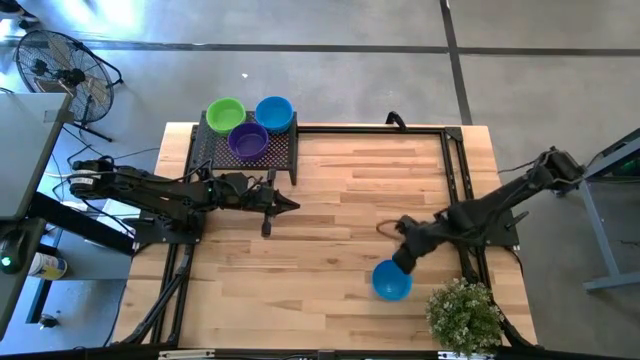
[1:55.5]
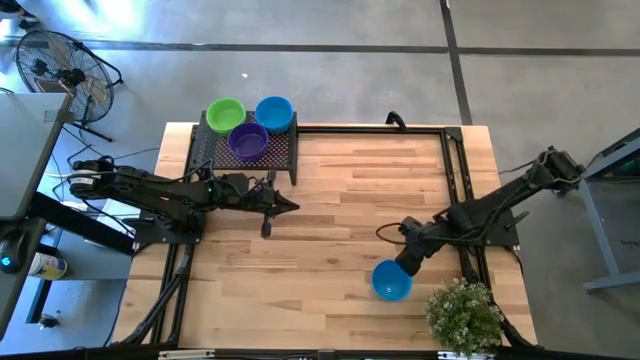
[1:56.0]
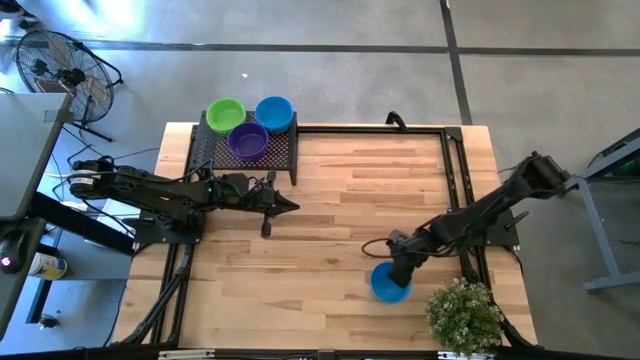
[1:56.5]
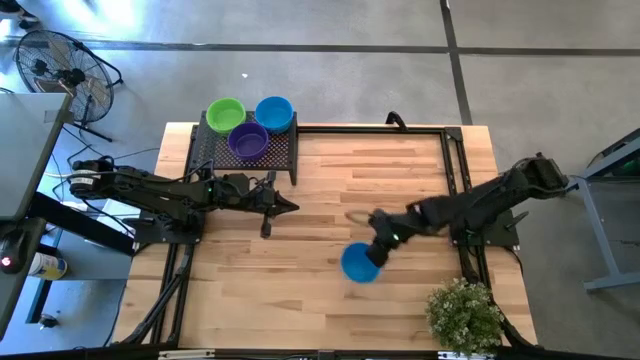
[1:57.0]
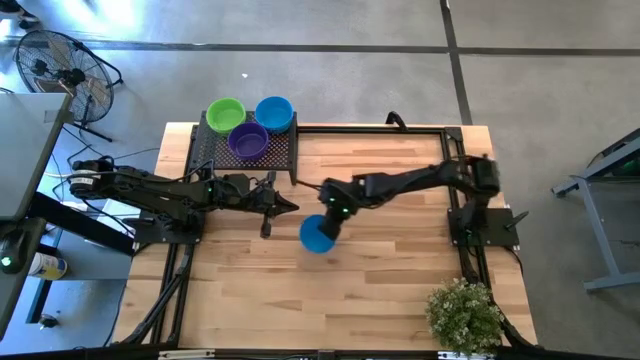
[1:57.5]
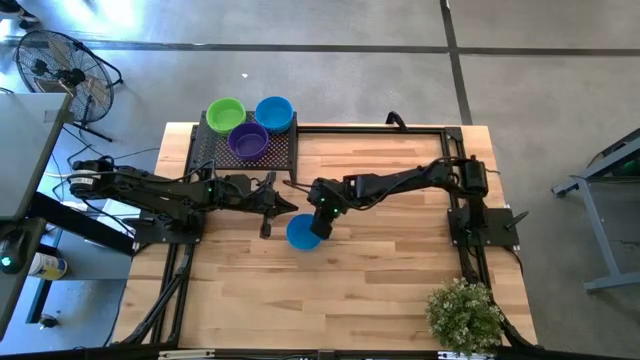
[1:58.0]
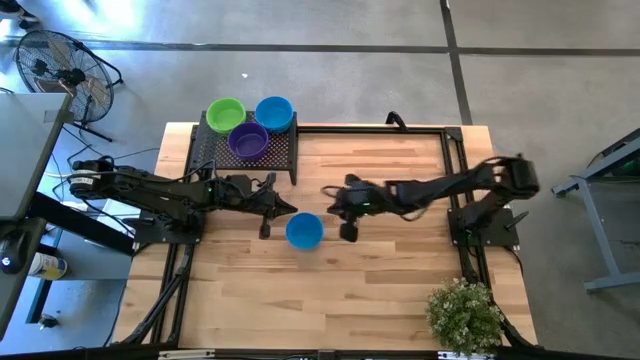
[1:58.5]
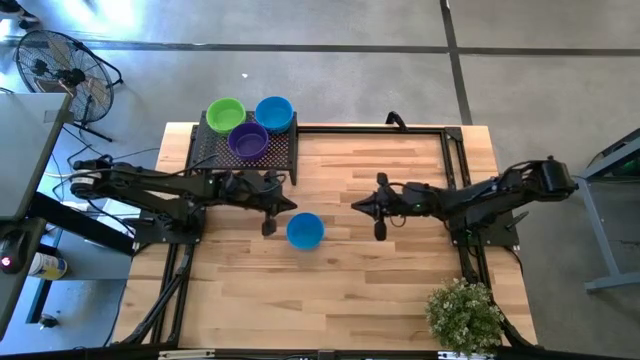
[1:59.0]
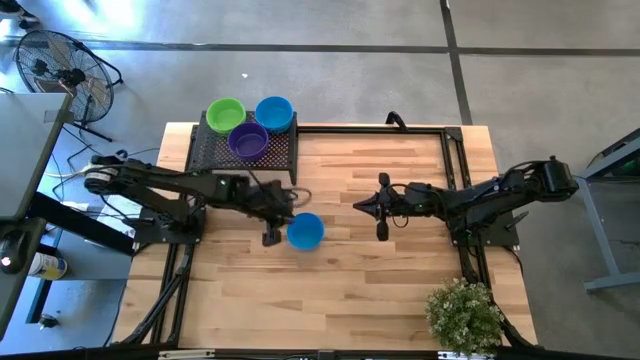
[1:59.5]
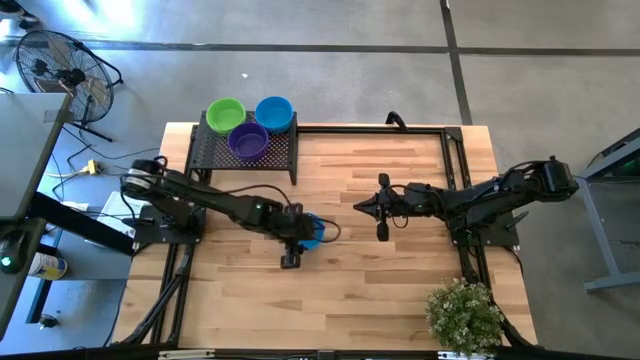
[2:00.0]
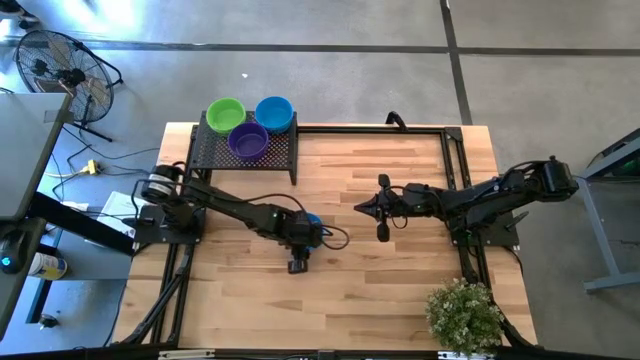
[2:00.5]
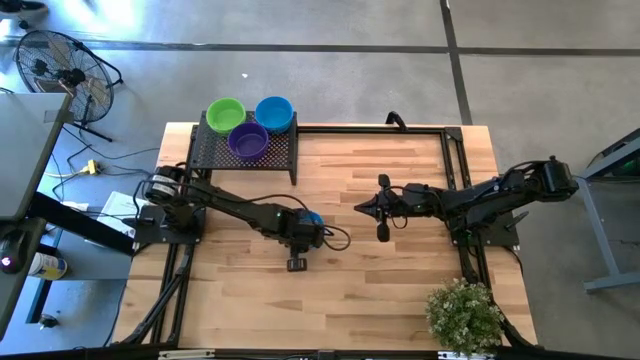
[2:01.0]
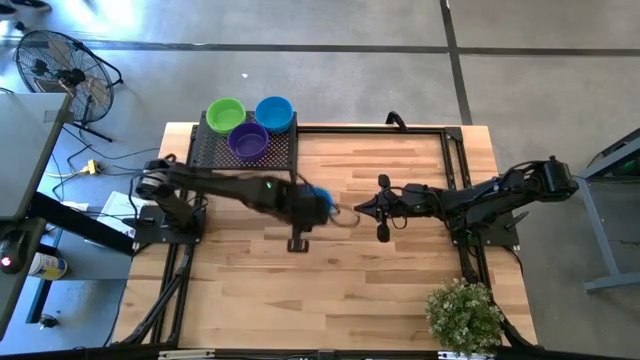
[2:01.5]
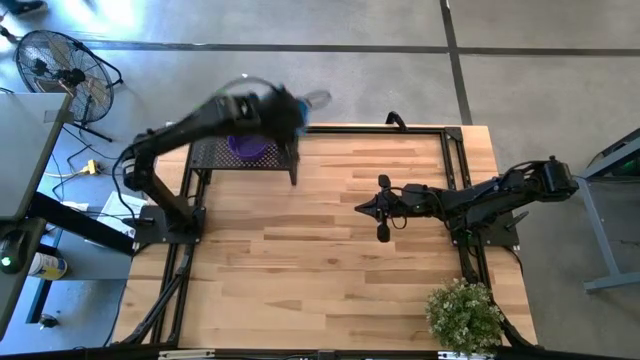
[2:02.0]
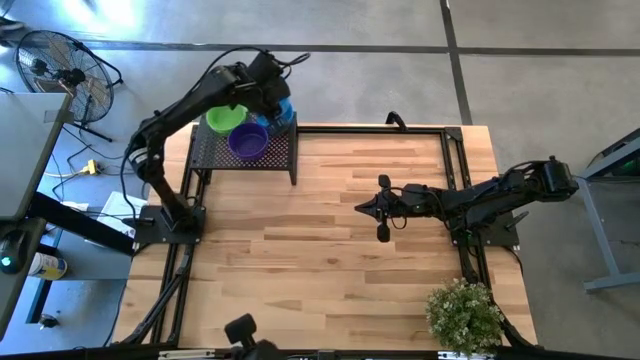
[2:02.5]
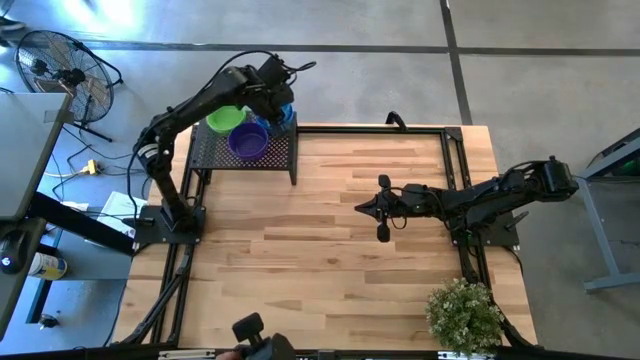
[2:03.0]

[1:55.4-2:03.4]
Task: Pick & Place Mini bowls
Stack the blue bowl on top of the blue bowl on the shelf

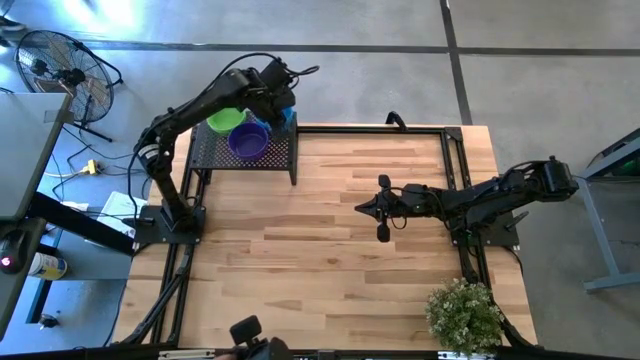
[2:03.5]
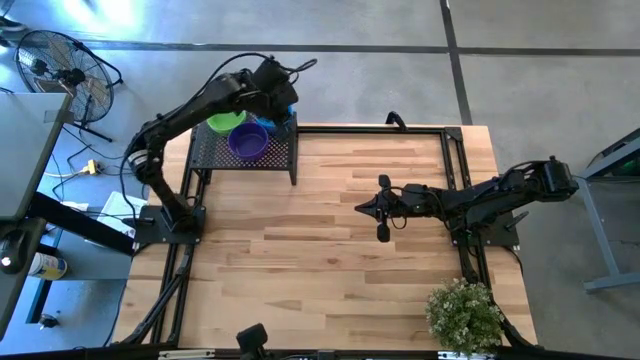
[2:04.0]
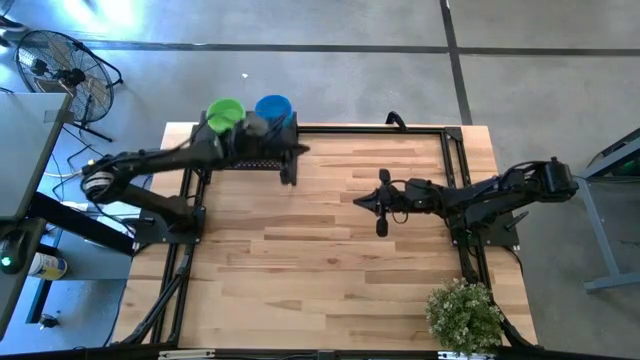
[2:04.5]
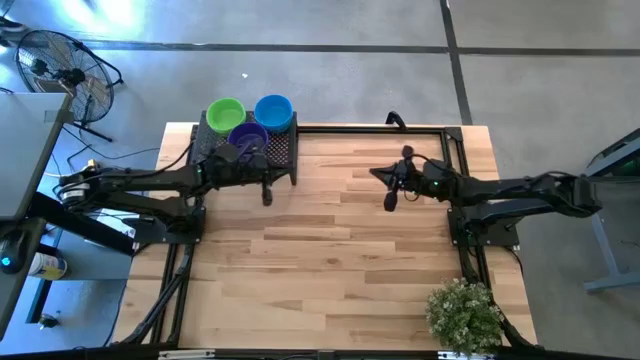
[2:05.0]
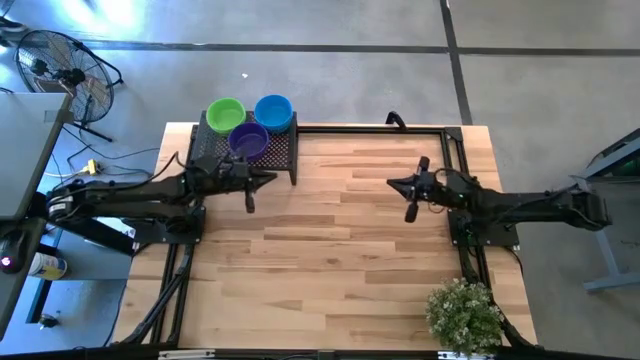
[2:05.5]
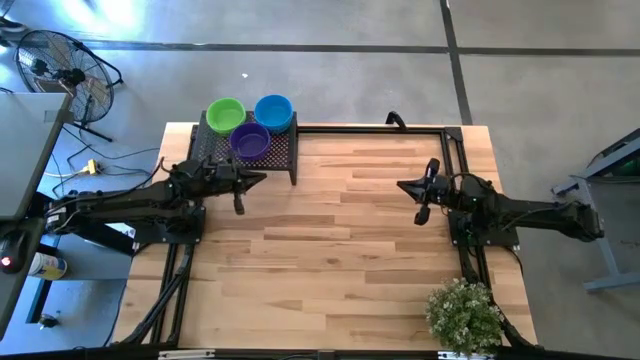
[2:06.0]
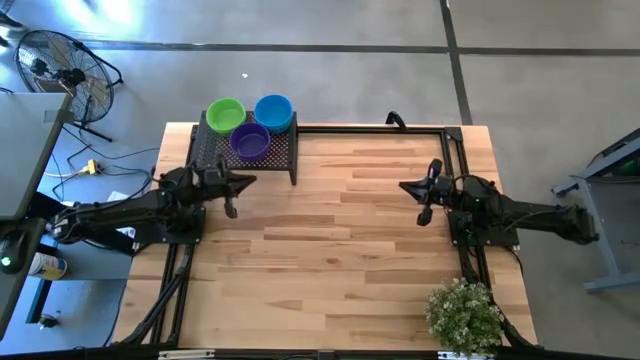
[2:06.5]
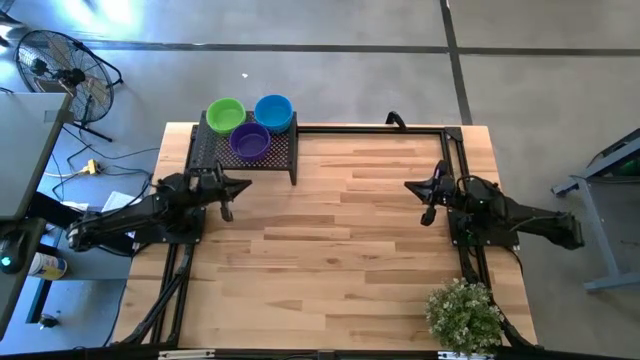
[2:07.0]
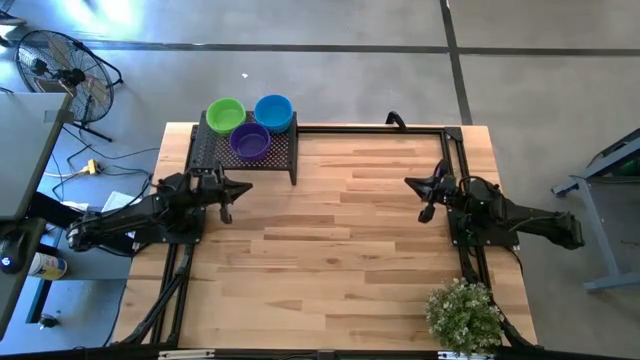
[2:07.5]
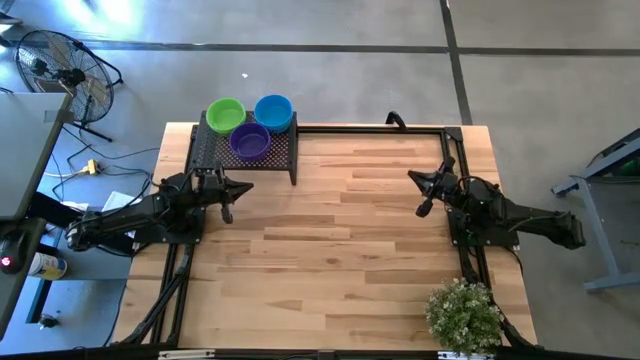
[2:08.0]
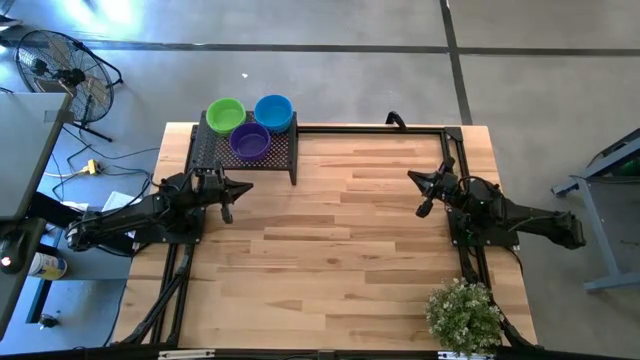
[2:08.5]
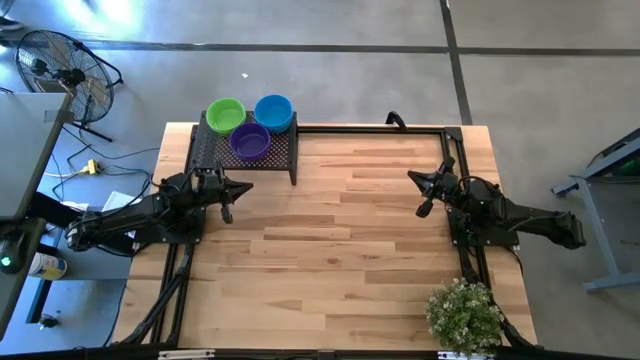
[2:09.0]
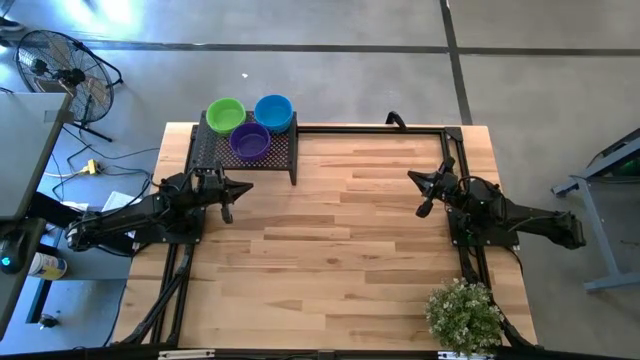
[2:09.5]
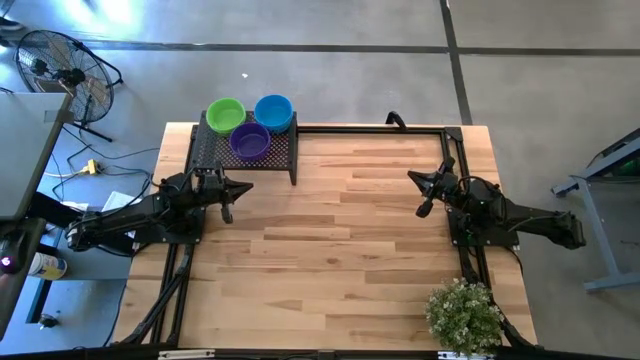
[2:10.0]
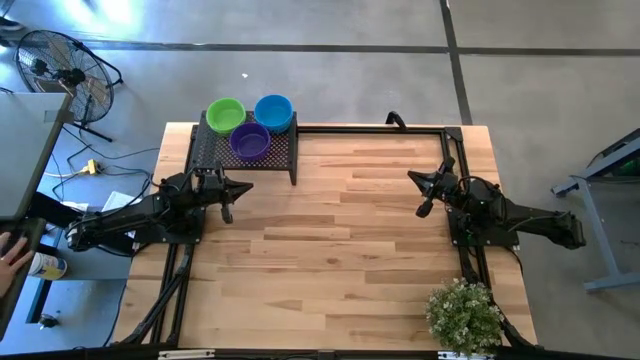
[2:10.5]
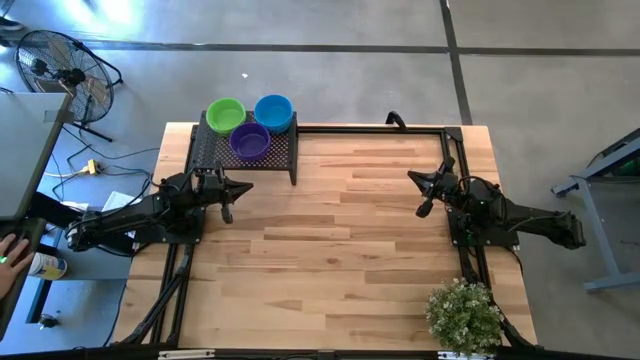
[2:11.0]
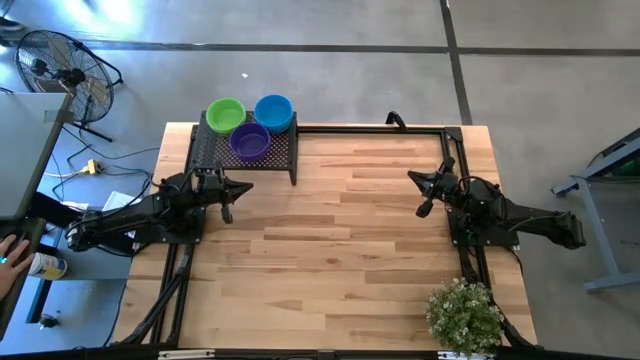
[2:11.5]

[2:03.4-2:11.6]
Return to Home Position

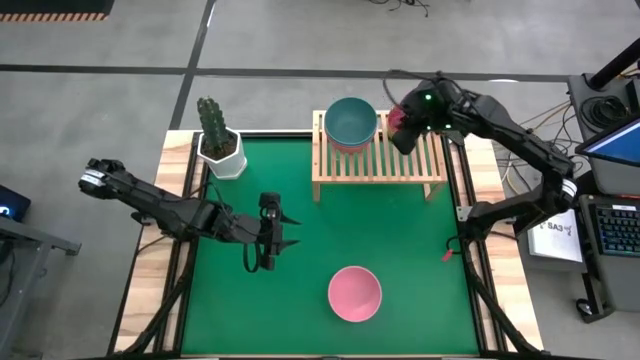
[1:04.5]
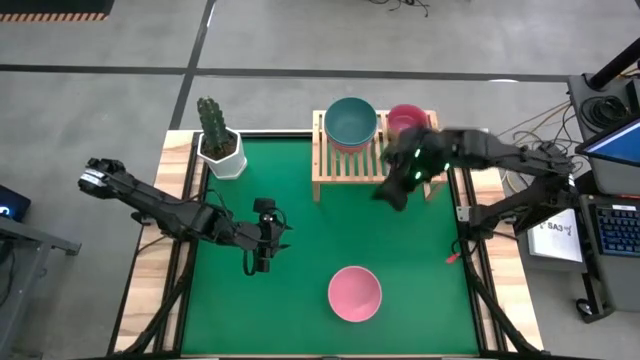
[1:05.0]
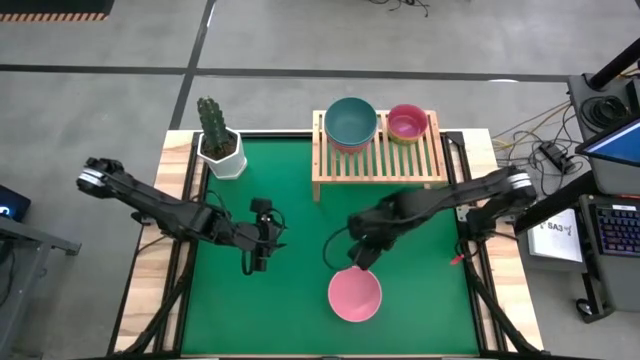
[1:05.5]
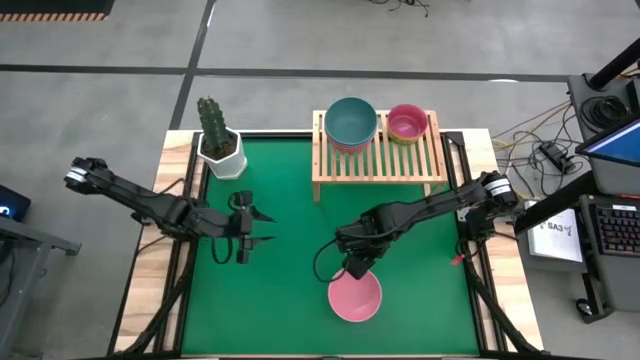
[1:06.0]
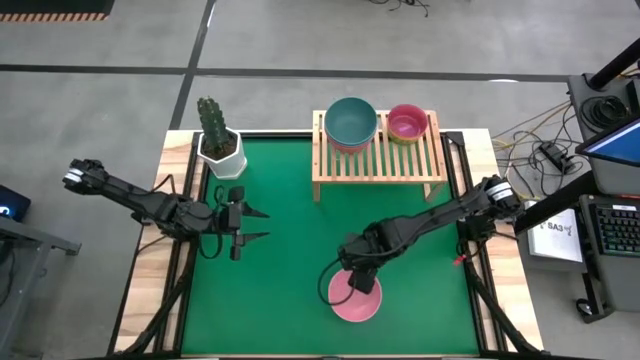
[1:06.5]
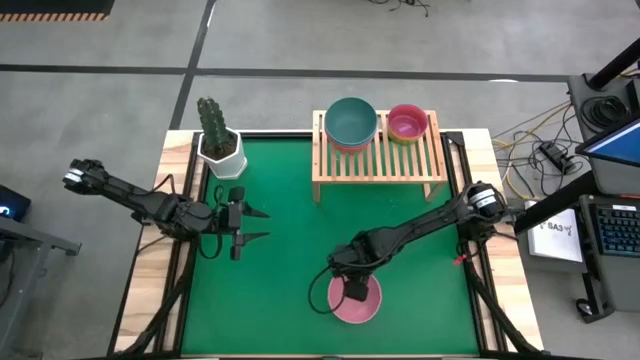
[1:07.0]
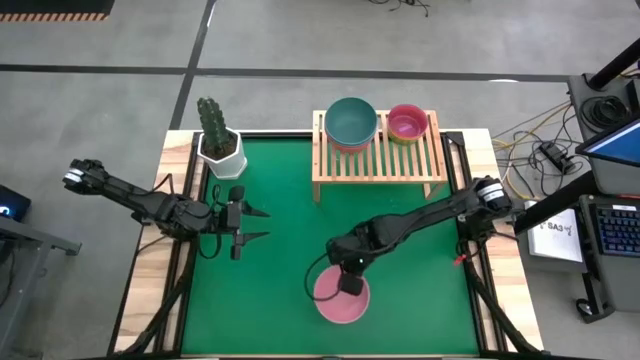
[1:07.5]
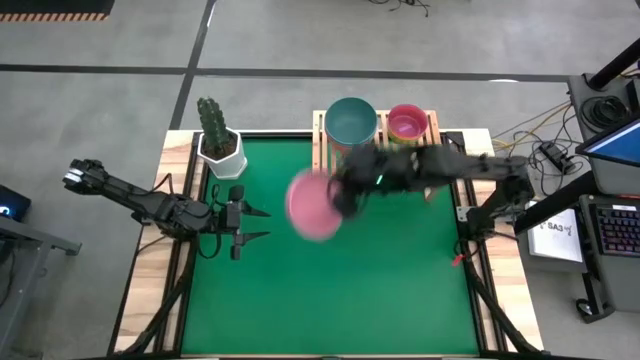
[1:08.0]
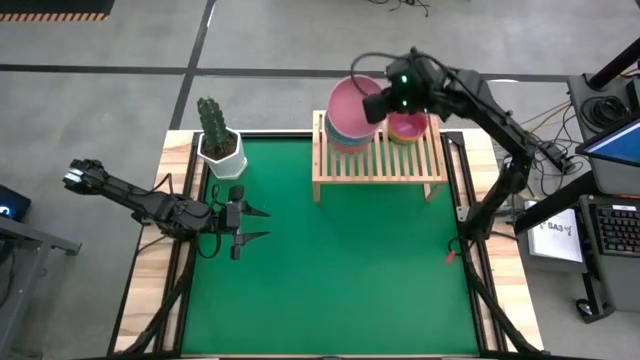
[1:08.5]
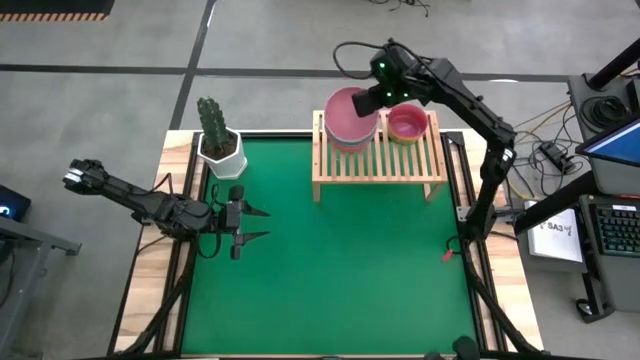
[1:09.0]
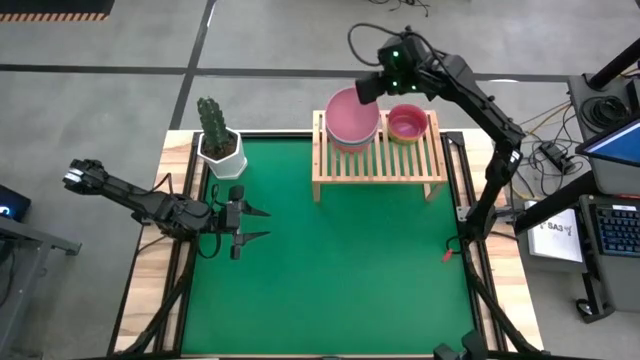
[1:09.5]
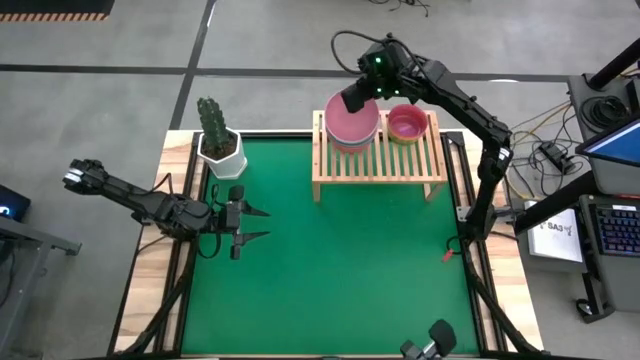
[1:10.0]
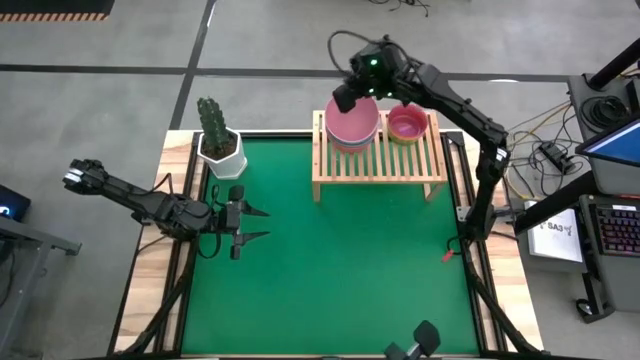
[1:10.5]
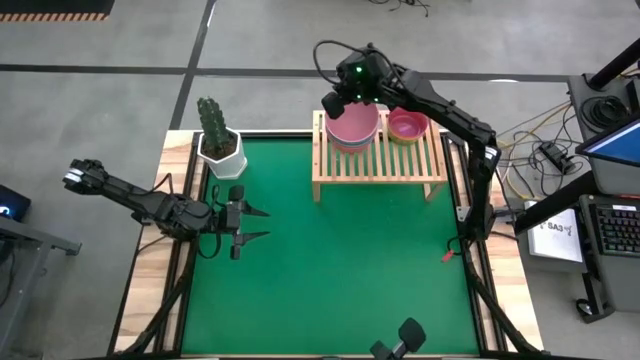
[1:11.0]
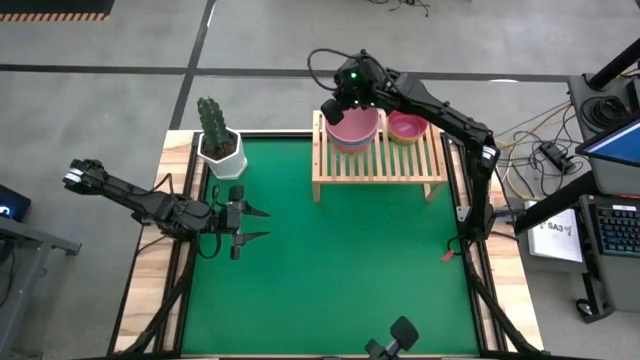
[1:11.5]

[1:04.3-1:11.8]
Task: Place and stack bowls onto a shelf
Stack the pink bowl on top of the dark green bowl on the shelf
